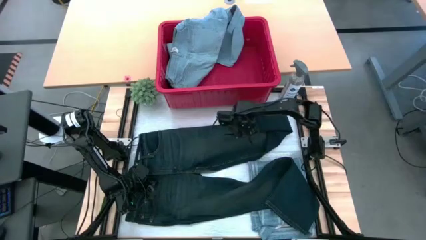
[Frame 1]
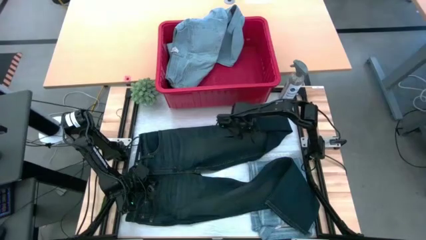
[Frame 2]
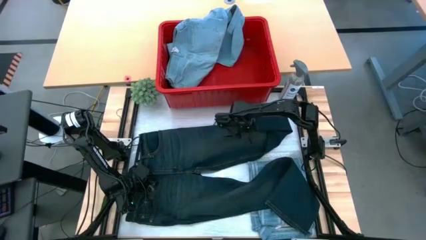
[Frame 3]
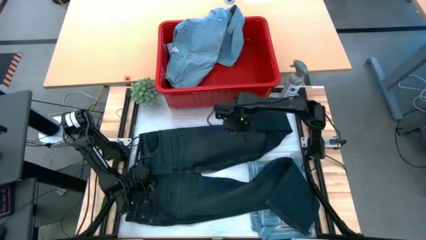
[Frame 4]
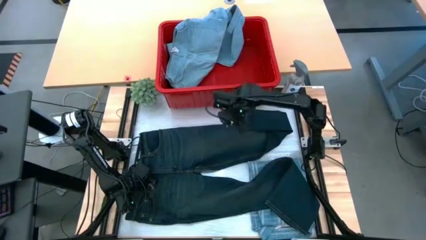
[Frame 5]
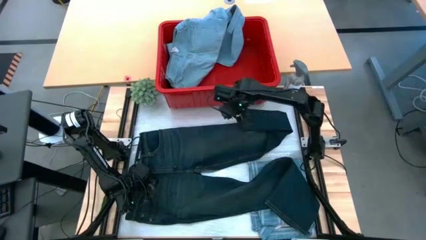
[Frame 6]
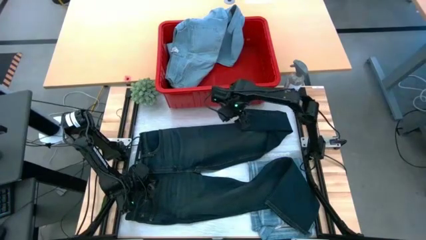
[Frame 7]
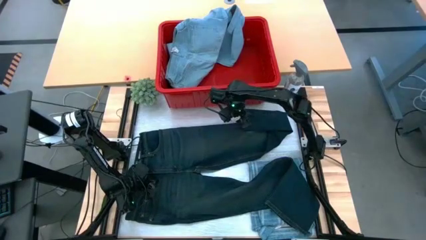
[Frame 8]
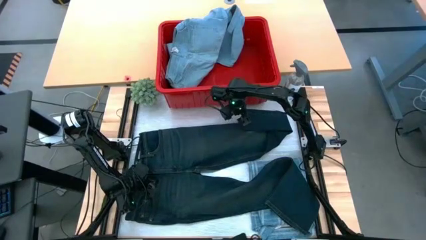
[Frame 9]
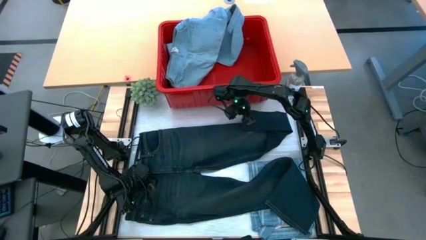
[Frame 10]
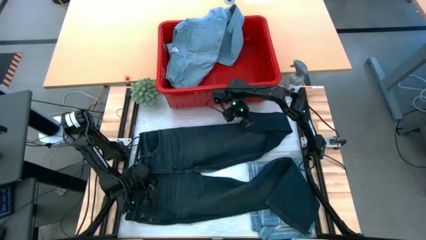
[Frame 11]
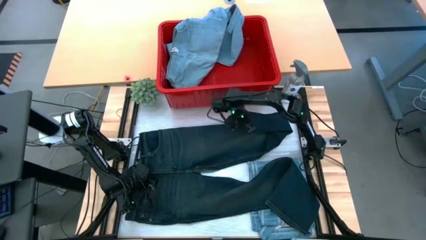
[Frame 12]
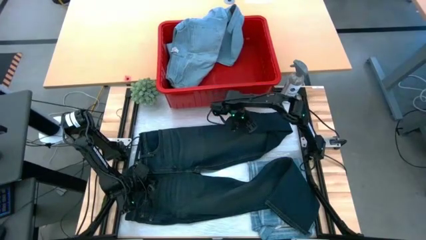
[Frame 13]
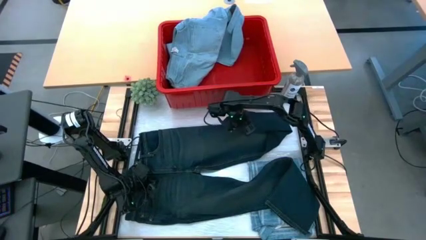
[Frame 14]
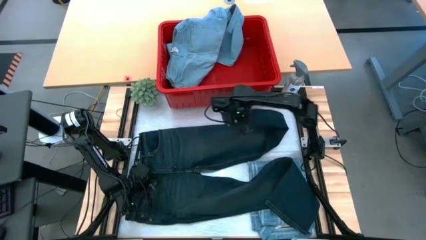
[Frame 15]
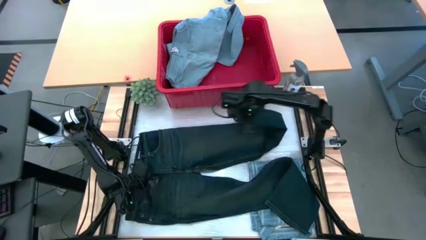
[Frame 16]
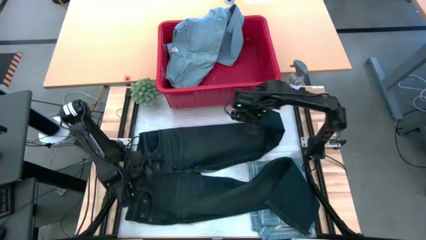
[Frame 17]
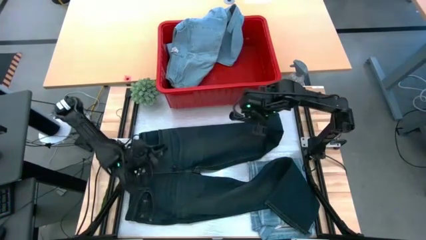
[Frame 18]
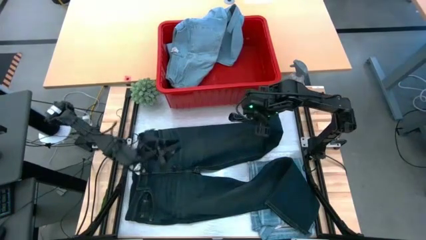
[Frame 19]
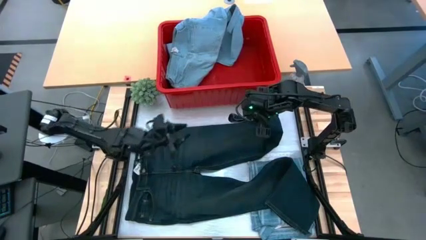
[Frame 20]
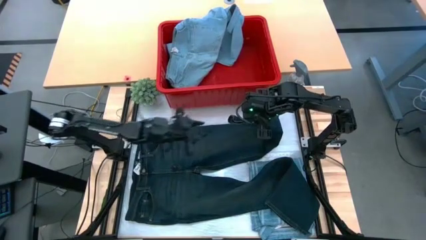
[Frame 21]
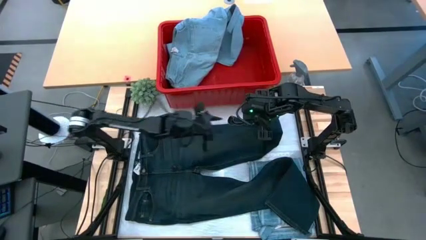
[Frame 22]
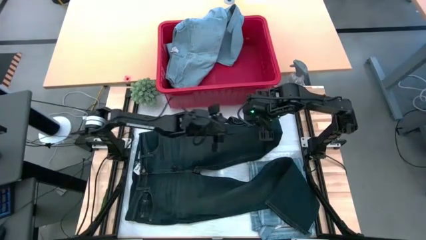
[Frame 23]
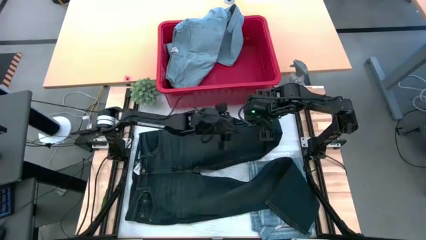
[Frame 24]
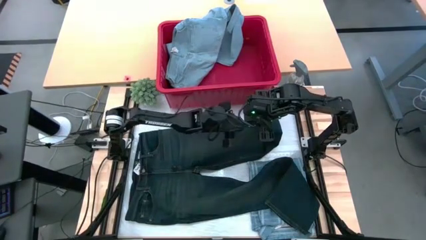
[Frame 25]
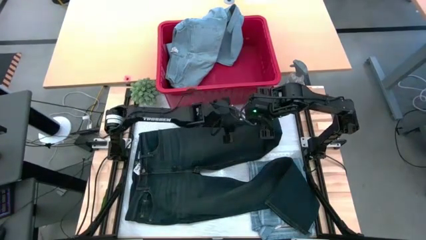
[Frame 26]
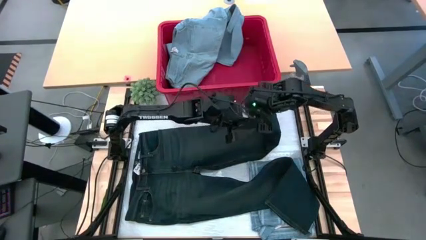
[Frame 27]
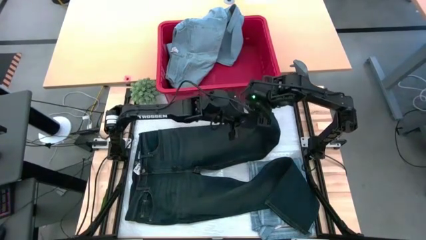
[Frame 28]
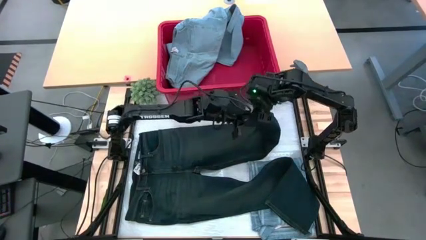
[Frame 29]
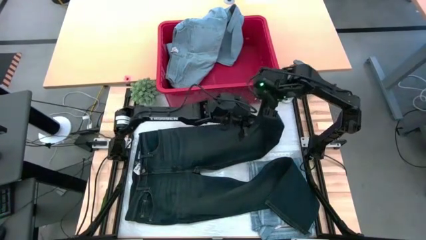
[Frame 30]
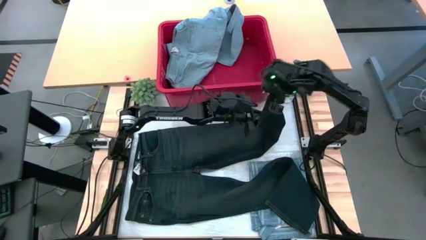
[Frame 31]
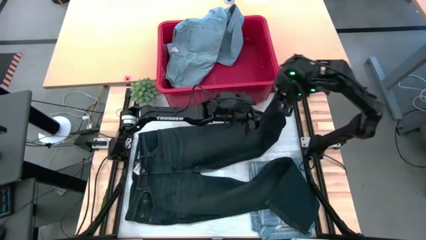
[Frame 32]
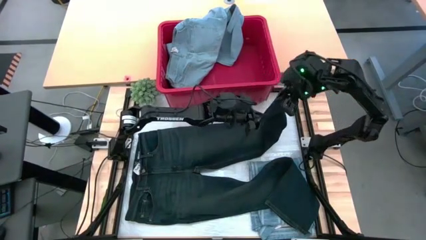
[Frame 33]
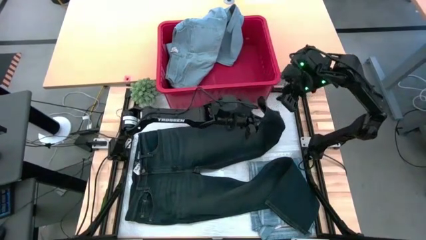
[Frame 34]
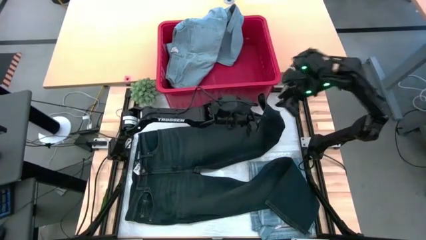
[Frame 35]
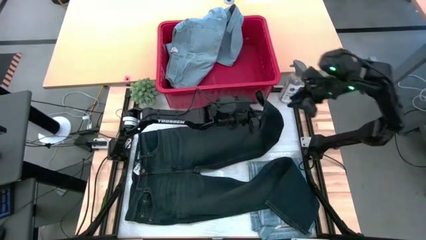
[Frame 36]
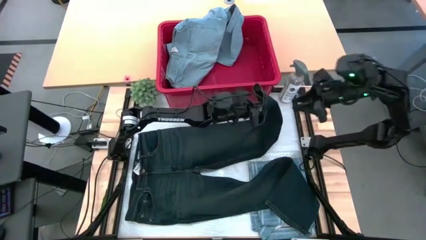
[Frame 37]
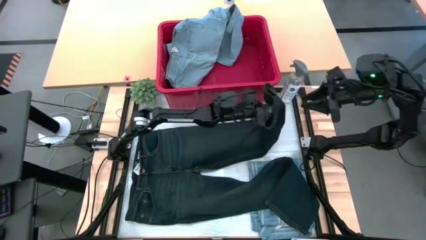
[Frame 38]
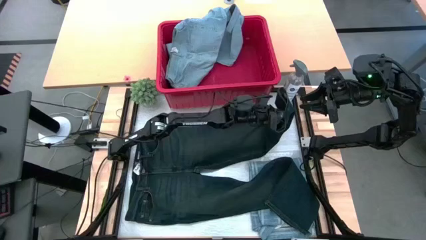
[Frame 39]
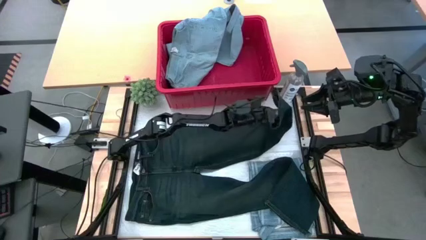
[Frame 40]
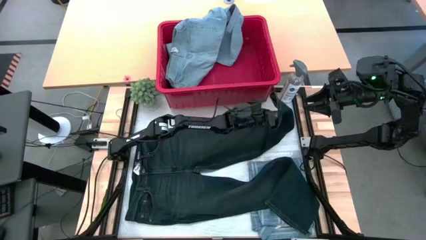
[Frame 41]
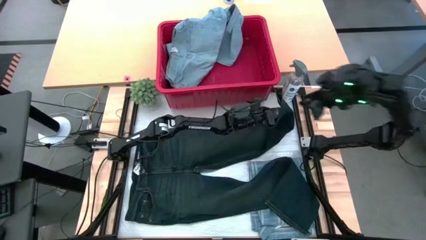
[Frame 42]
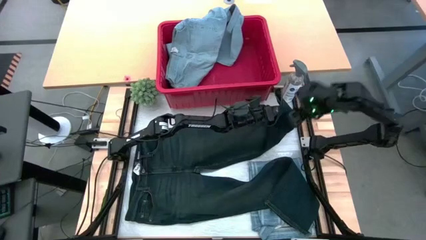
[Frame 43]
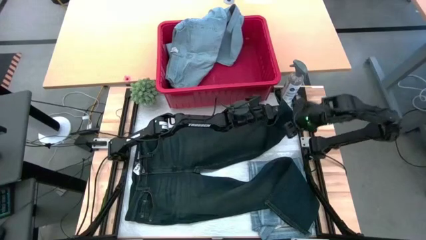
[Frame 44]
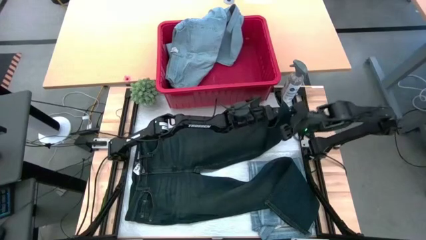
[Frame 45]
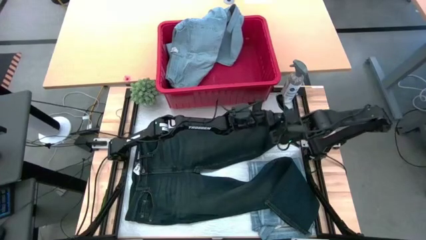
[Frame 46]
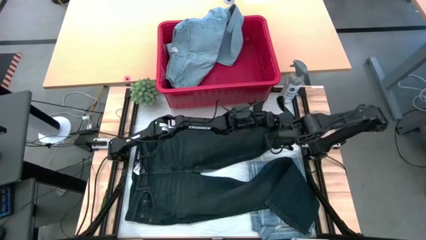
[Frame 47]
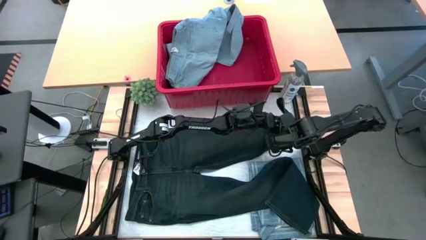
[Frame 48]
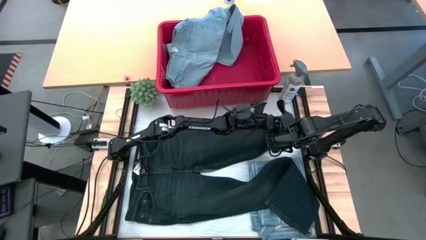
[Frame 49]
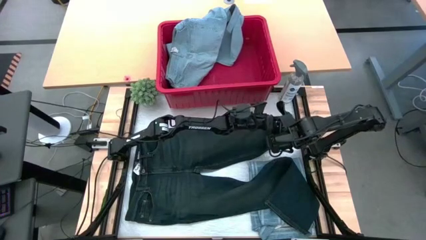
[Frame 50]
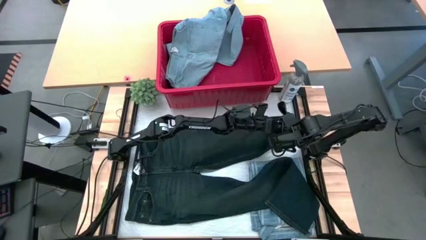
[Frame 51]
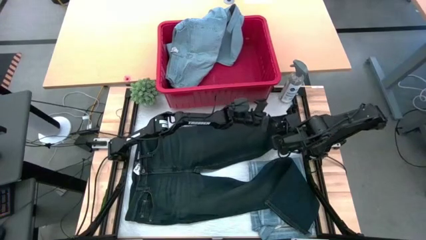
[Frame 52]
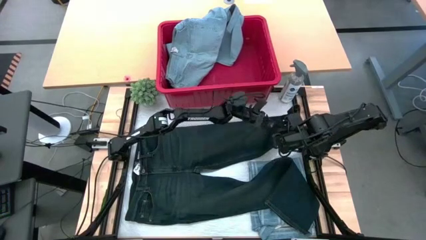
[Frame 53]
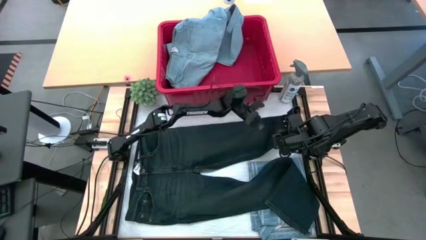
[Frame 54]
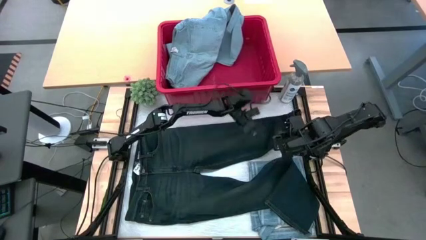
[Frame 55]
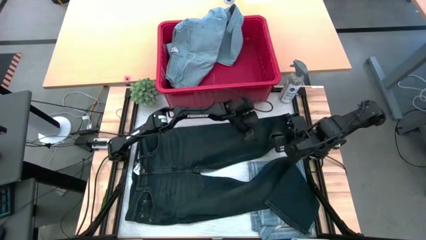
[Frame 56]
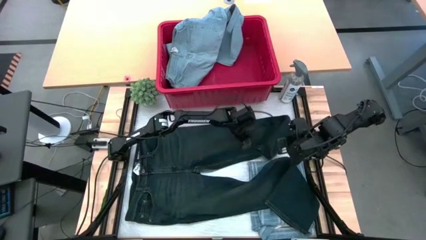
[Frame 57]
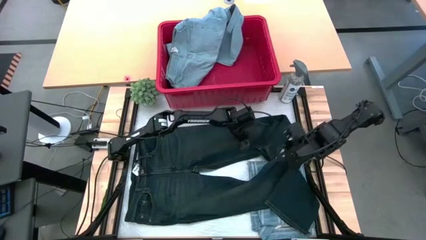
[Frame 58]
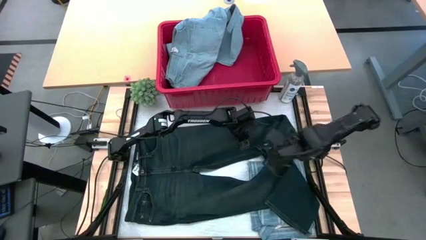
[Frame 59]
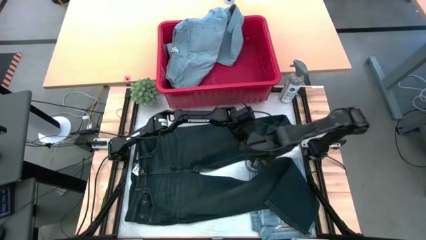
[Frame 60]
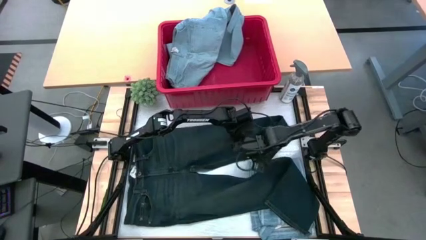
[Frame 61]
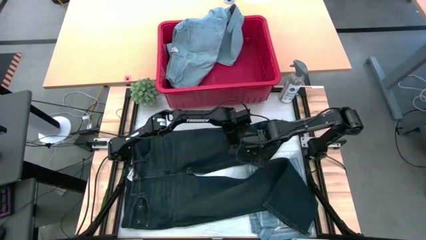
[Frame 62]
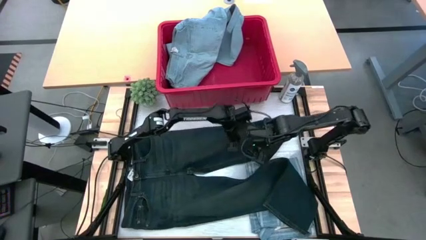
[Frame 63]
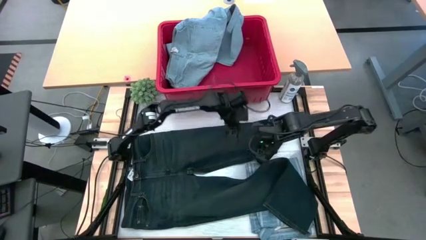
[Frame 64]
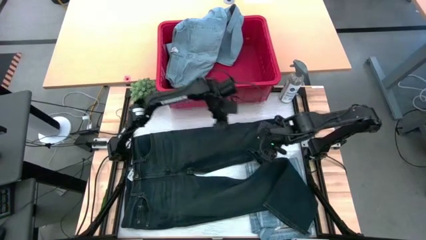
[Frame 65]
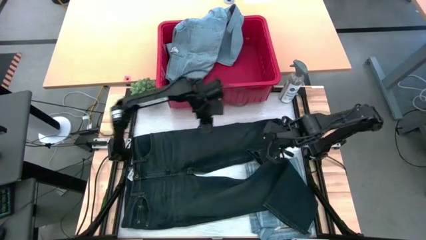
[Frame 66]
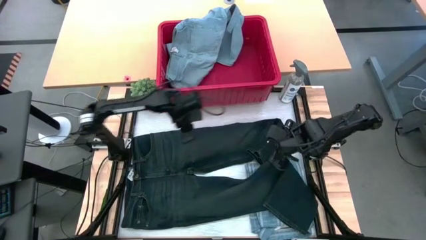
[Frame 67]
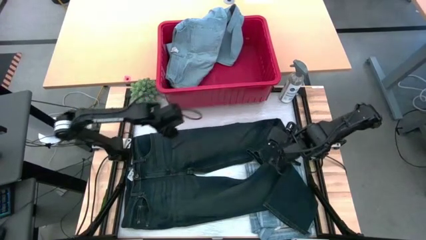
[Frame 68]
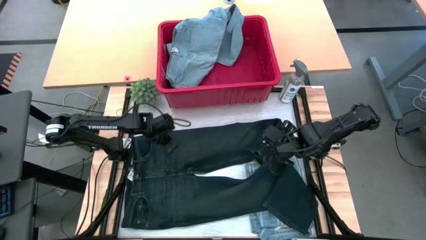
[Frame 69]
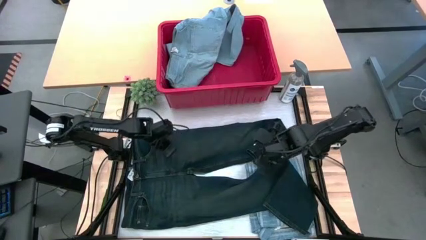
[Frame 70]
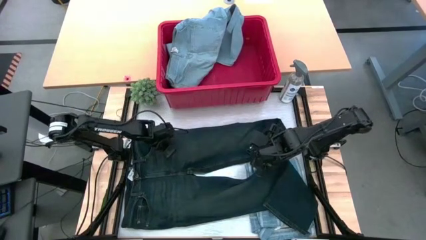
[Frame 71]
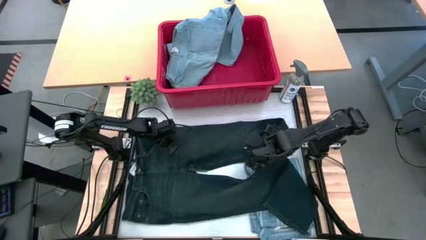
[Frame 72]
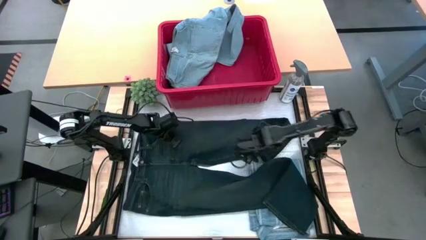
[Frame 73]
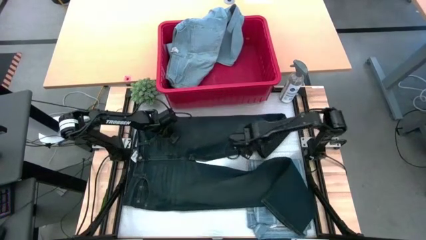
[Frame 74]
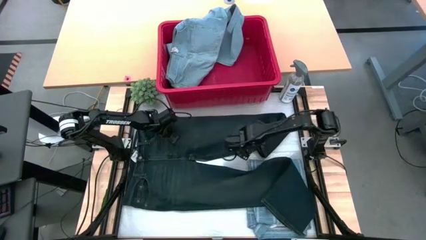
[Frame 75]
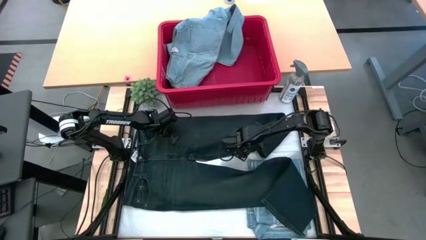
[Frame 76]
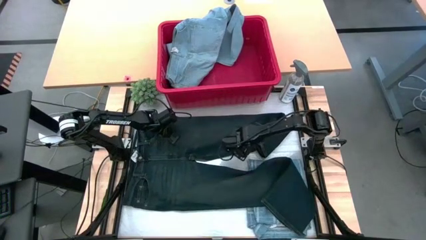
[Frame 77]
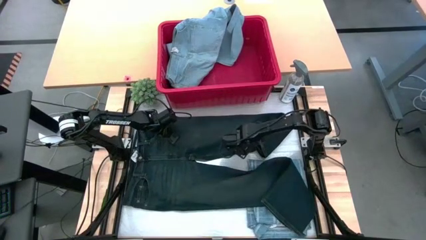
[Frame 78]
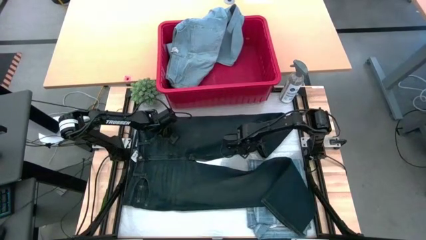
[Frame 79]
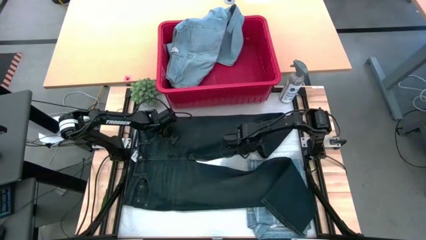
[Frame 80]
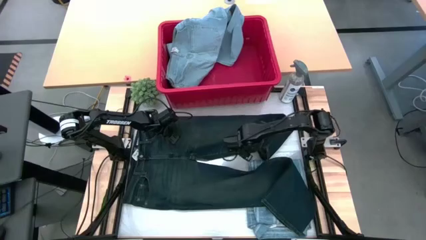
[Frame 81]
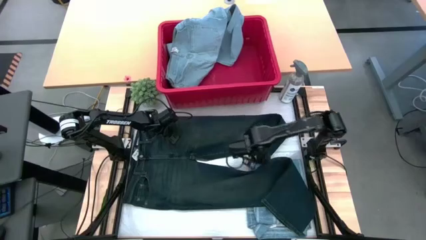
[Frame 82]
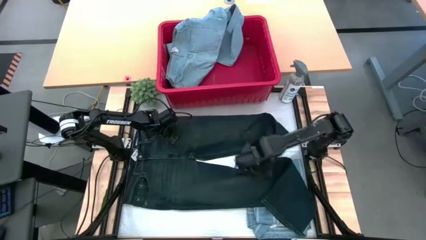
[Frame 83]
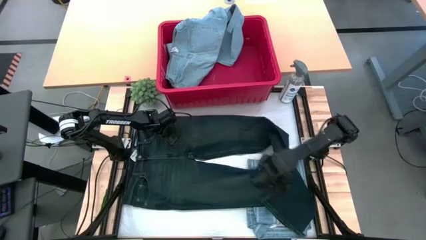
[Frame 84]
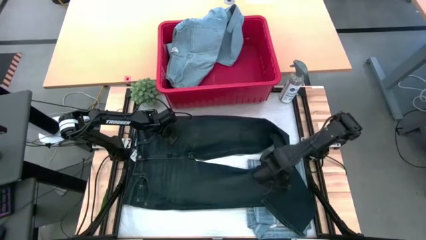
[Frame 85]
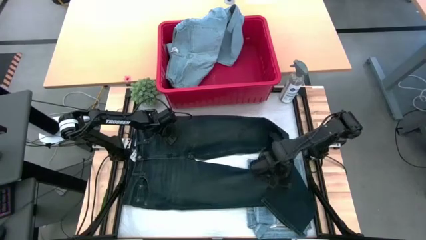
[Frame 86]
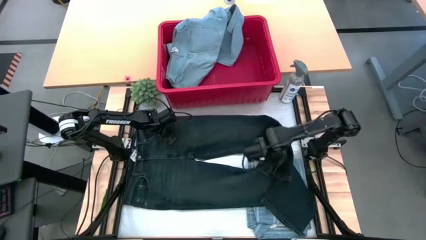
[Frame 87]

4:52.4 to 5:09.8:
Task: Fold Laundry from Bin
Fold the blue denim pants
